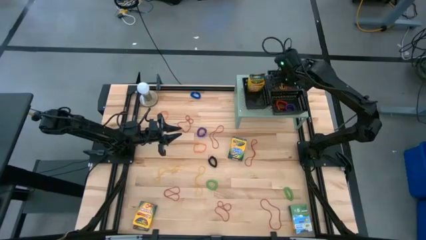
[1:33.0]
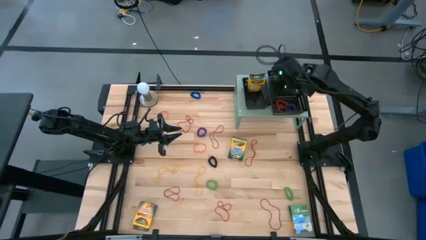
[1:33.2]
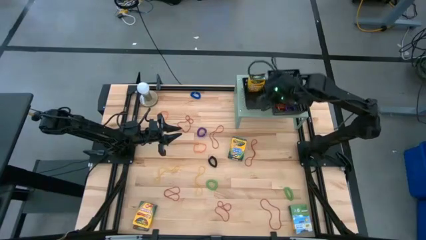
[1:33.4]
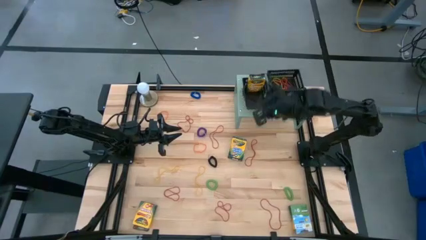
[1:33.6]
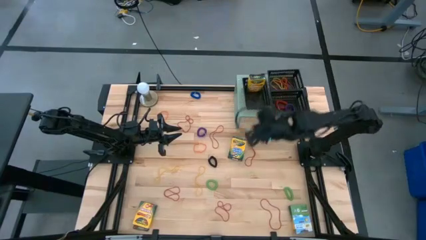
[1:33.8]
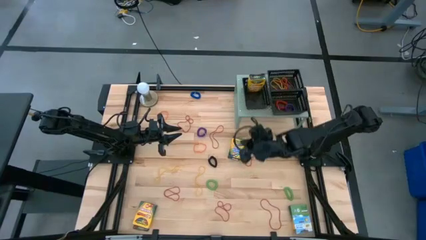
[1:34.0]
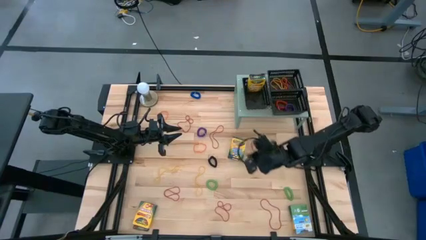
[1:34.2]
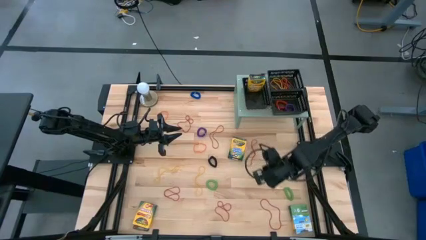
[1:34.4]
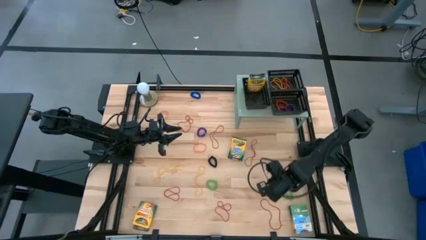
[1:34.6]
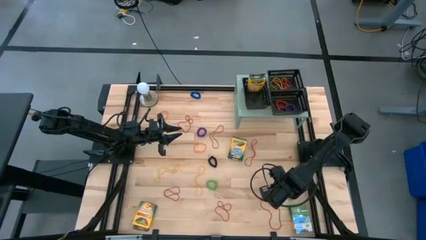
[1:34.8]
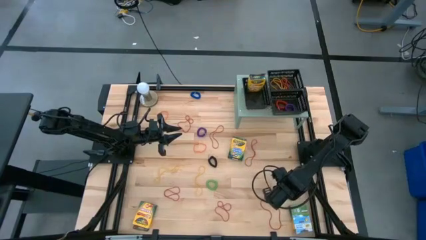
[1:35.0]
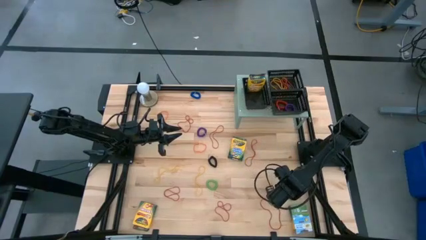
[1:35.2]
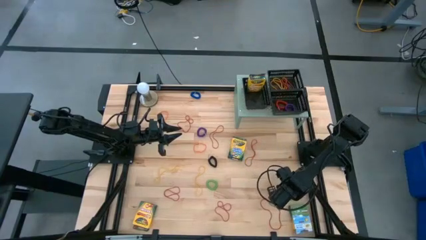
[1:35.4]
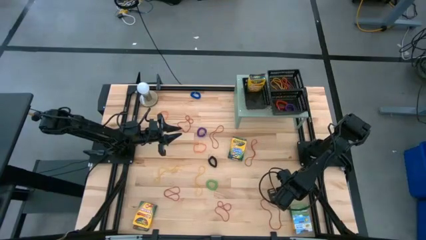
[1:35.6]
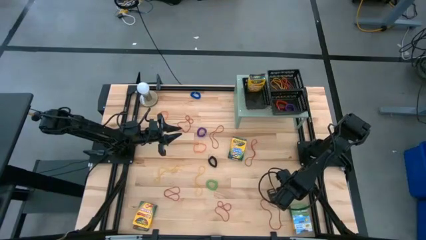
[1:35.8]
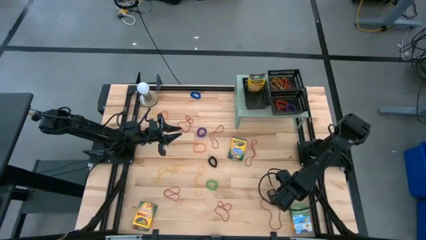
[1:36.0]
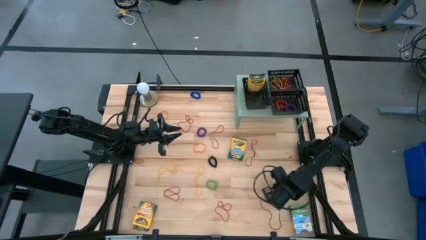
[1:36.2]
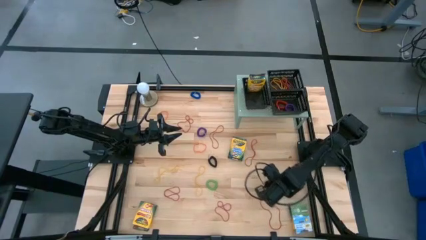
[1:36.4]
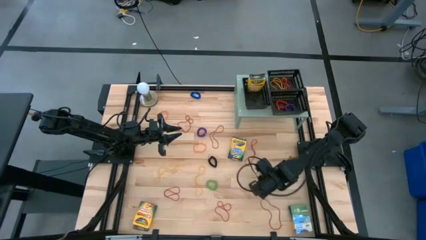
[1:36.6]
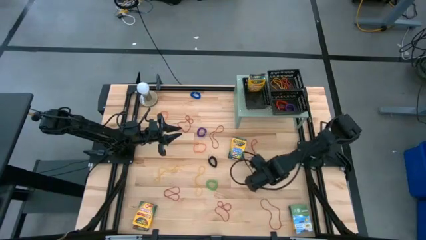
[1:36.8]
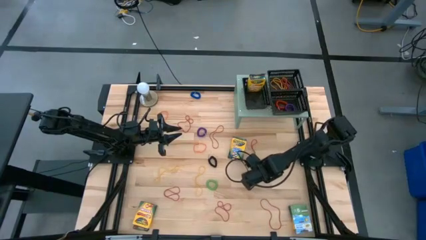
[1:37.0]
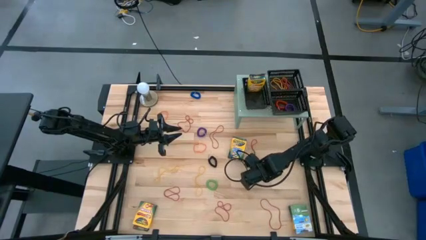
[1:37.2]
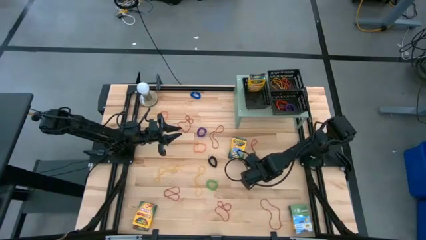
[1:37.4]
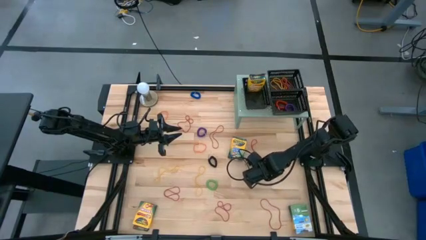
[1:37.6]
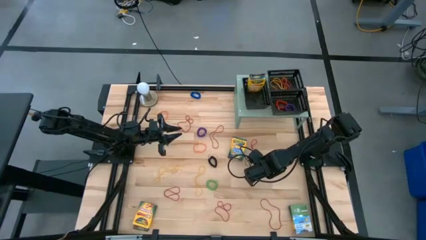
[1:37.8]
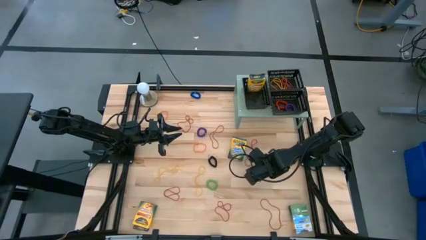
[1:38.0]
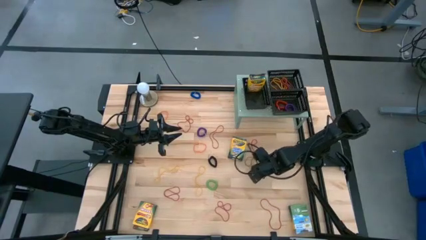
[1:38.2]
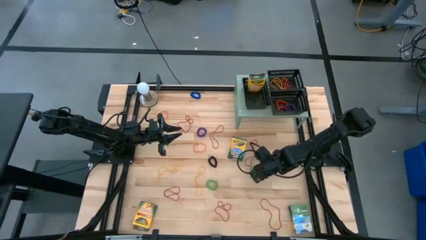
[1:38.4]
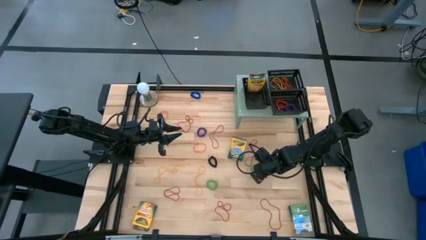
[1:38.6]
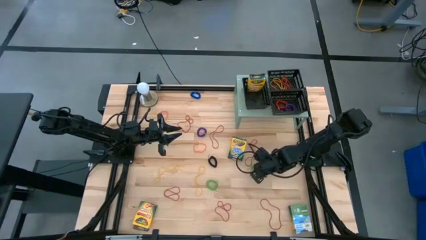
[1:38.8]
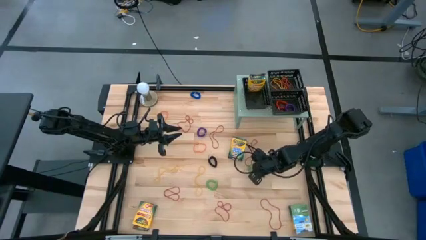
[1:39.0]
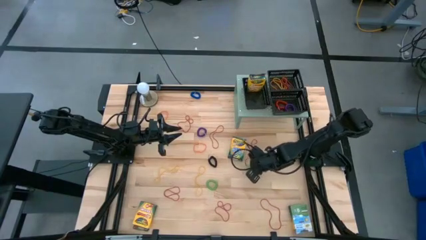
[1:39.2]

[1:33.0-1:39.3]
Task: Pick & Place Office Desk Supplies
Put the right green spring keychain into the bottom right black bin on the shelf

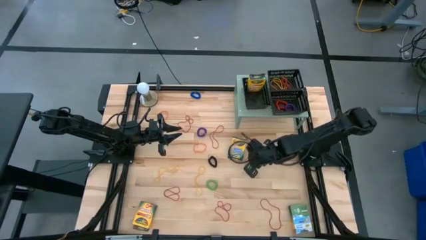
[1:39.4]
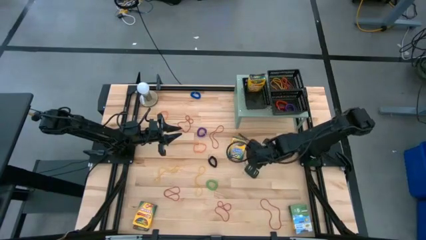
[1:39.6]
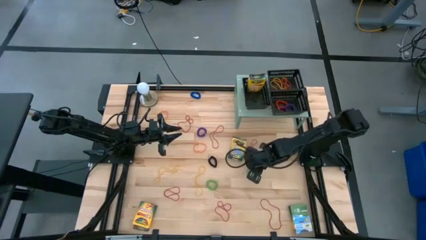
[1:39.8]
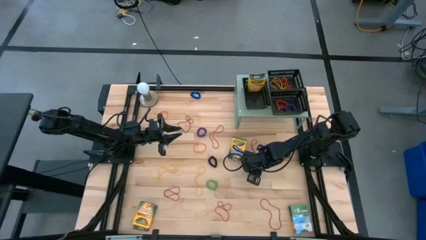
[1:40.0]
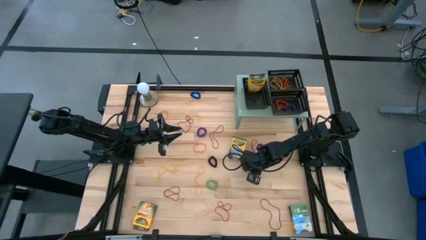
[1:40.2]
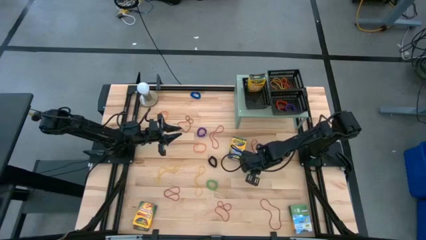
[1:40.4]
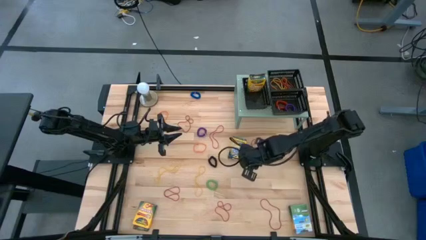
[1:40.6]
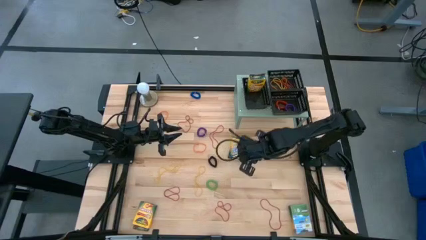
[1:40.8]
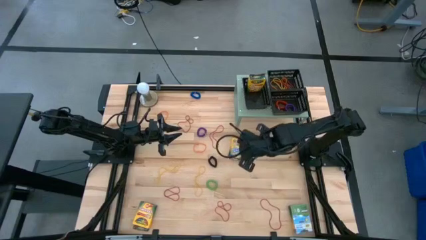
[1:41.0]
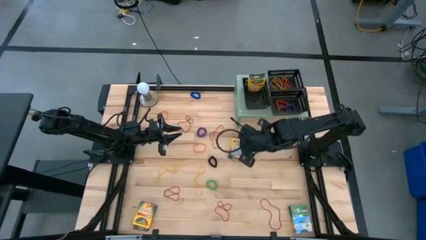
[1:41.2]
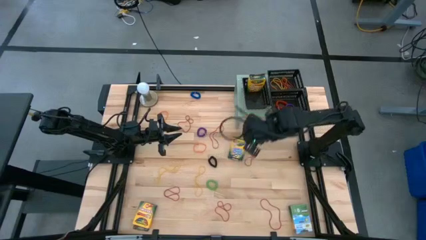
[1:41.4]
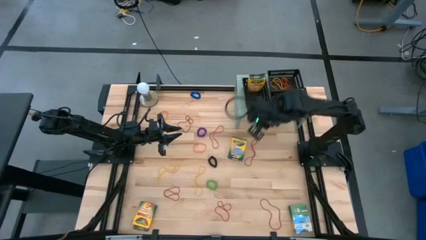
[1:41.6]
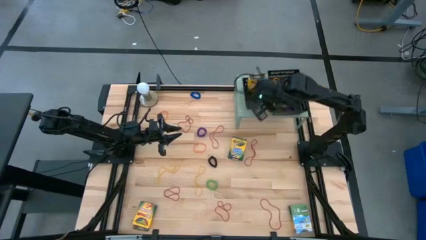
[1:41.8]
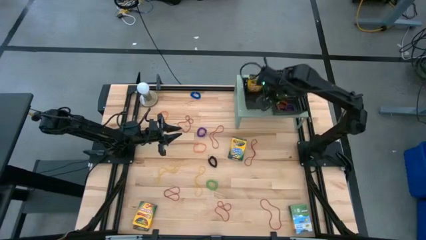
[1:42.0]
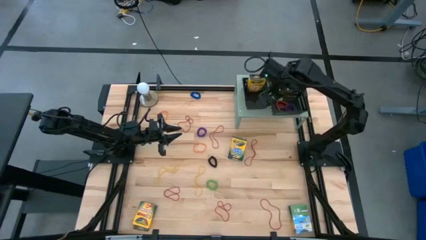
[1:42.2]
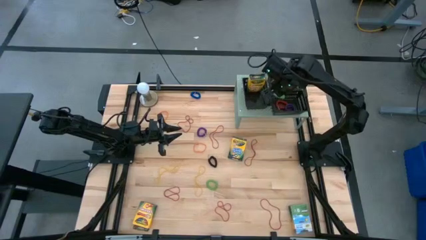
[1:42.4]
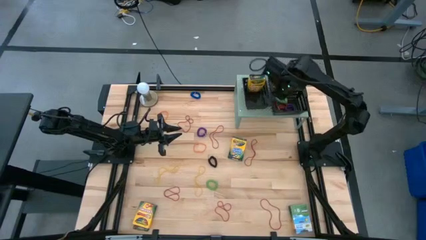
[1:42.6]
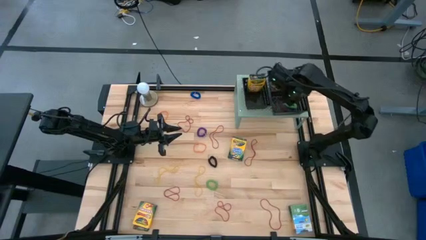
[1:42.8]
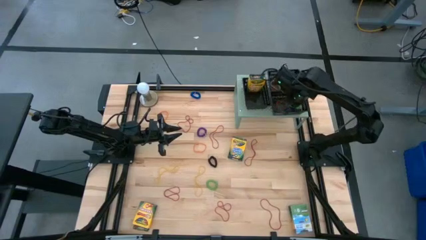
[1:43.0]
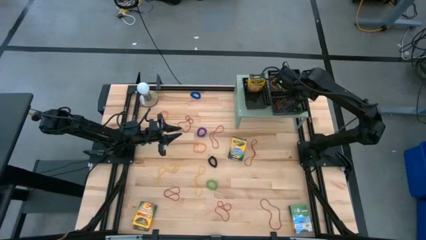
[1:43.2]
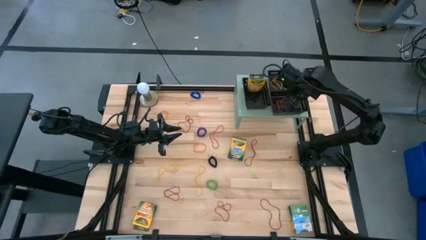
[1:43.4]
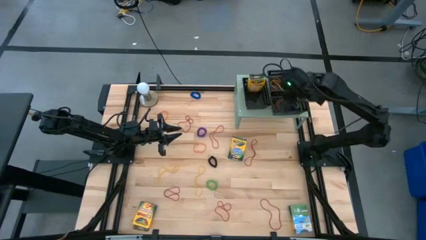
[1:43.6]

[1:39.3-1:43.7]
Put the top right green spring keychain into the bottom right black bin on the shelf

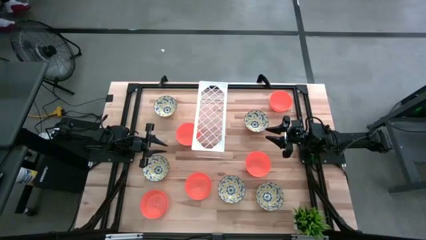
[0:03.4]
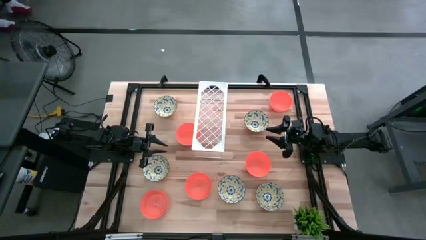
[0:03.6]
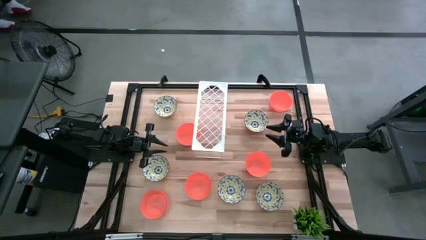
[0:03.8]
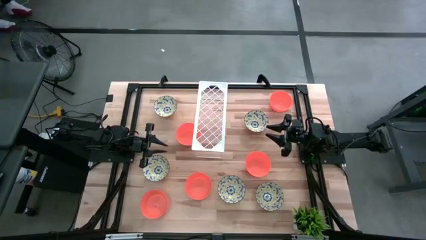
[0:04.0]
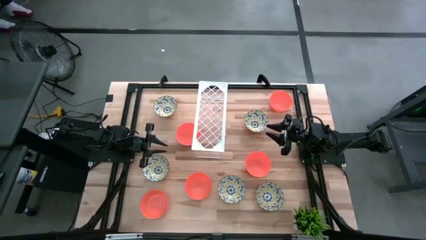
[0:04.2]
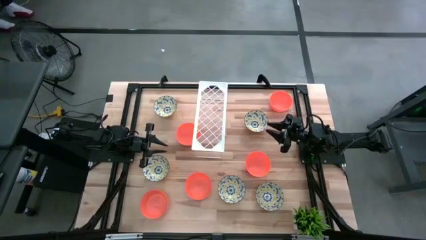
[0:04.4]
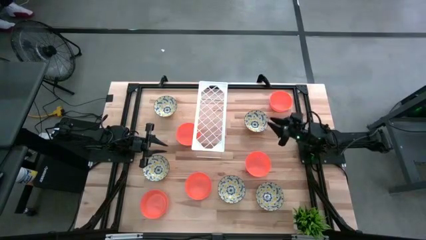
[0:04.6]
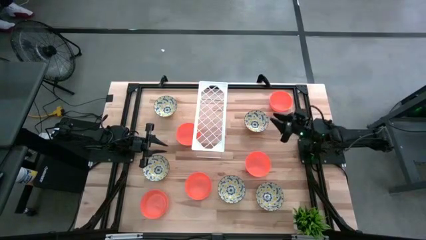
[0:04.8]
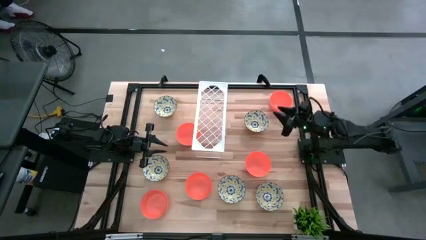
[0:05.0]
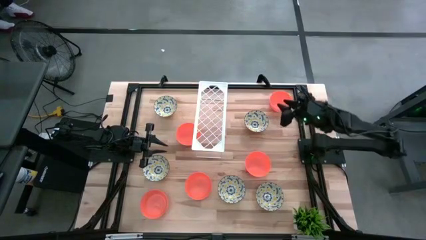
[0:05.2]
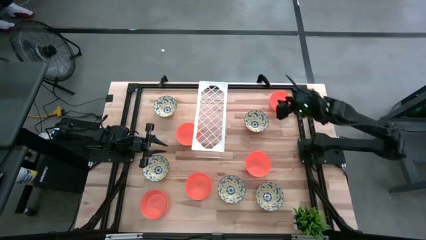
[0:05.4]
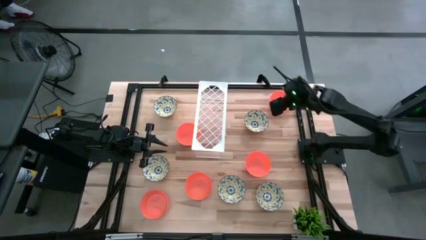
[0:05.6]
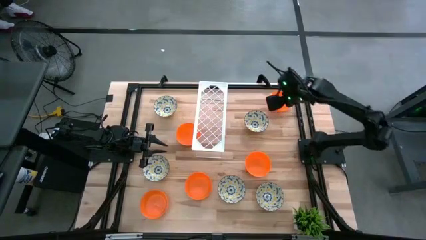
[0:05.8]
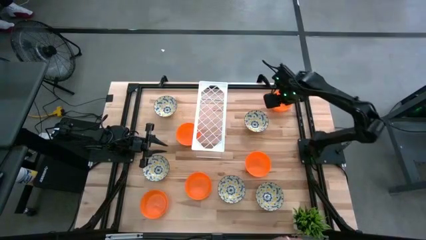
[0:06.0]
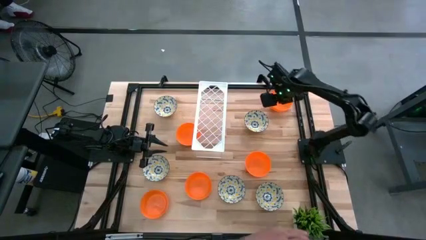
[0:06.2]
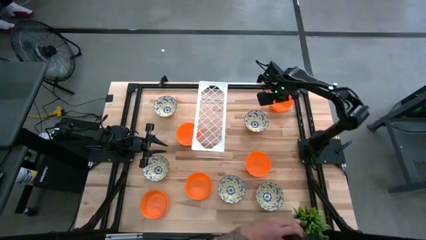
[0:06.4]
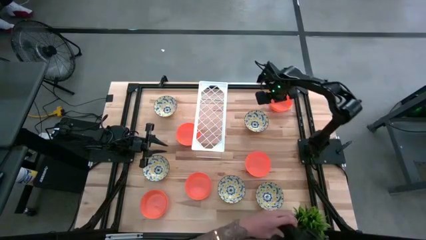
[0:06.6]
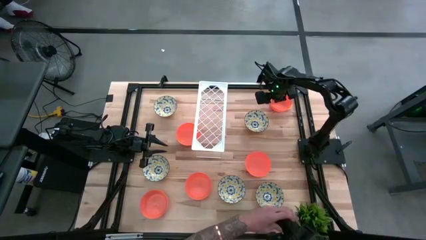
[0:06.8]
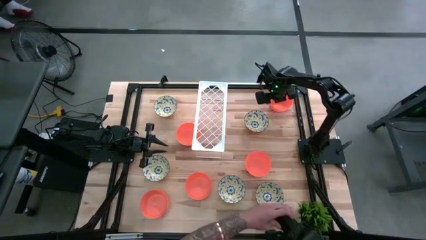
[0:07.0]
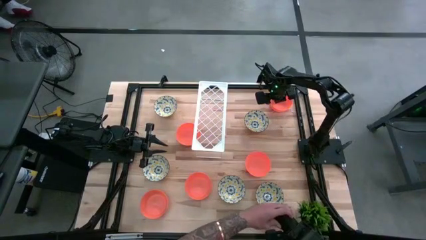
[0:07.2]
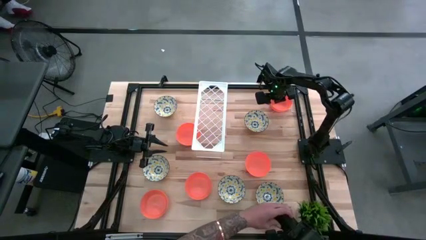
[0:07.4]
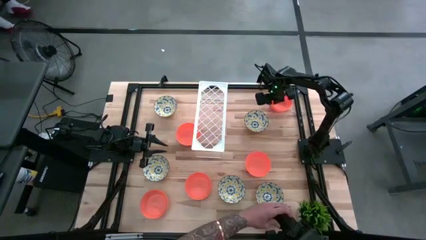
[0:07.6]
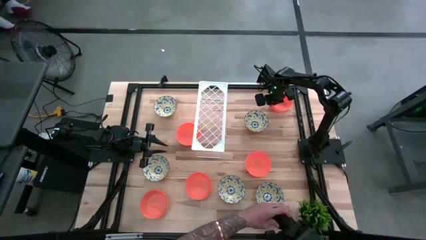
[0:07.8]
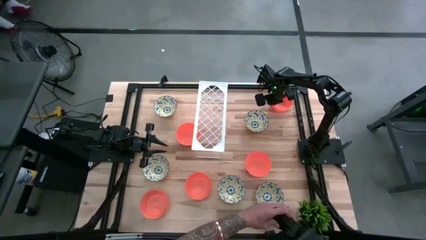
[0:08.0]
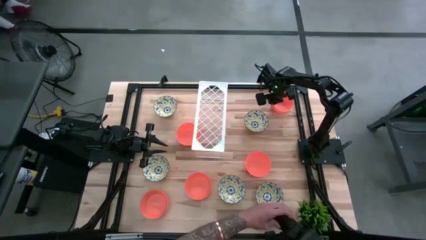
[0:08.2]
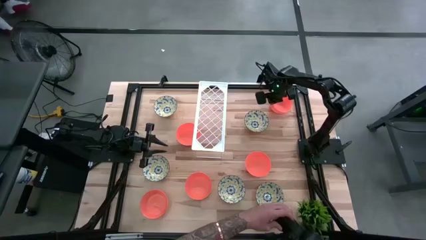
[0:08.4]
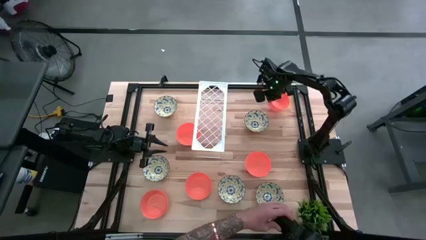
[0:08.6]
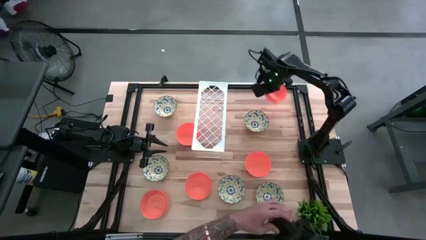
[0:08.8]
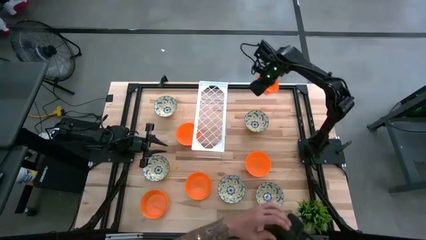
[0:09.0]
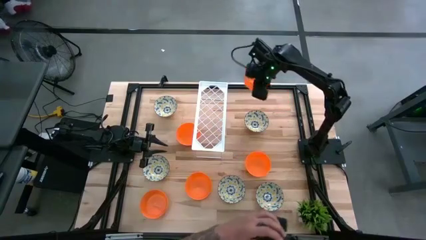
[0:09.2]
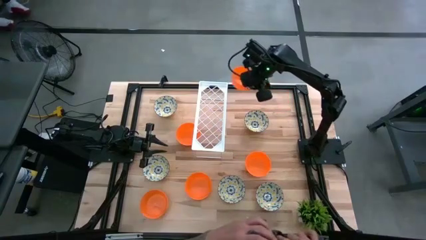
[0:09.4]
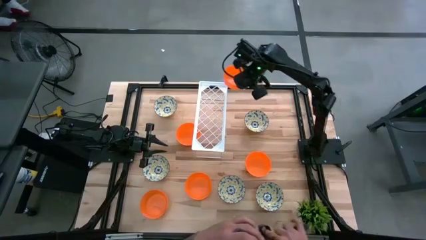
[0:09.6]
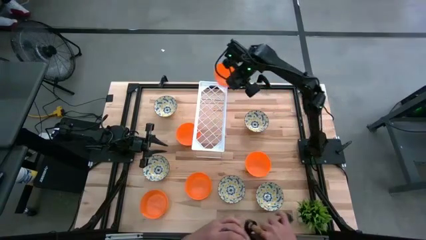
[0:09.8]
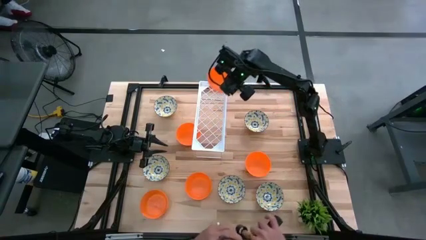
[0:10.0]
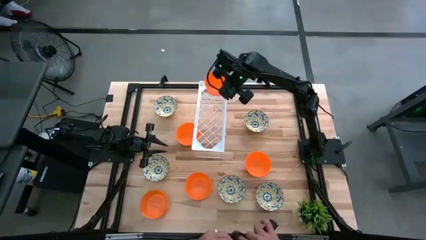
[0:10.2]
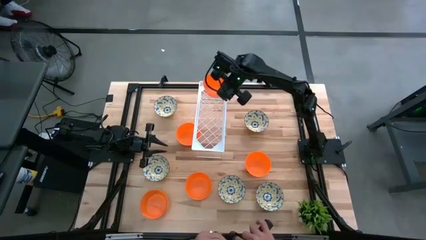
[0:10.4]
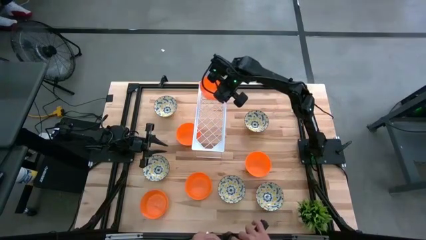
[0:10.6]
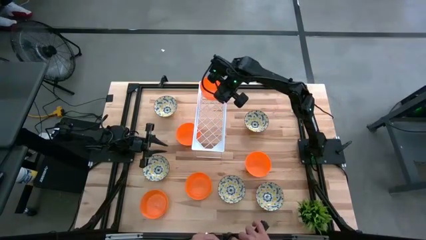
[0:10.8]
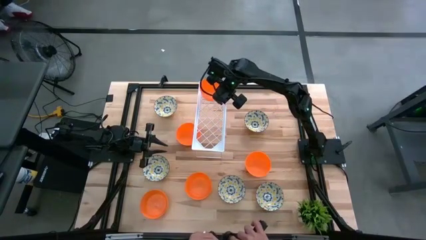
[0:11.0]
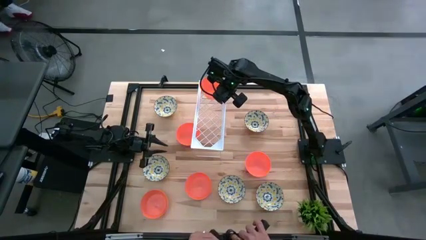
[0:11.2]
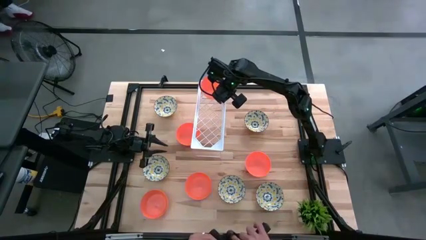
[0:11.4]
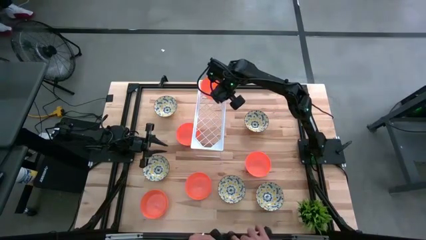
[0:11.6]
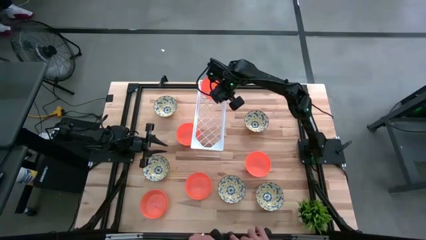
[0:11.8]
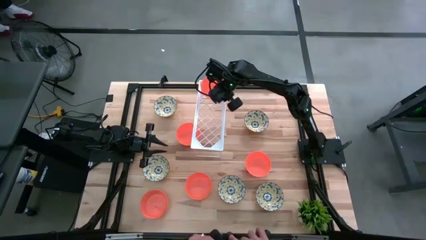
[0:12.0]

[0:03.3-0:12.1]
Task: Pick & Place Mini bowls
Put the orange bowl on the shelf
